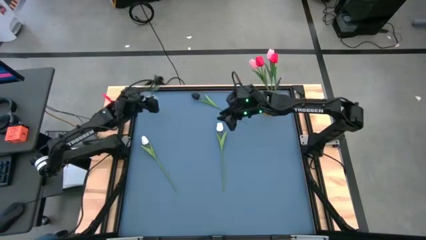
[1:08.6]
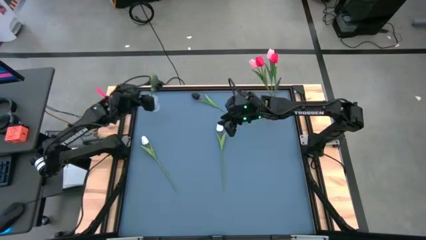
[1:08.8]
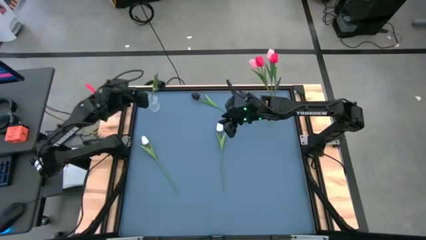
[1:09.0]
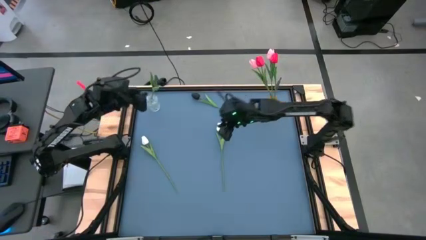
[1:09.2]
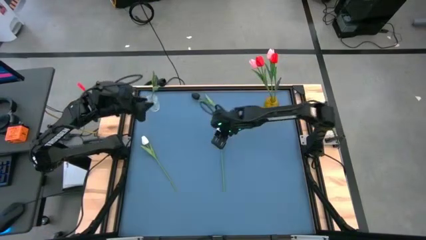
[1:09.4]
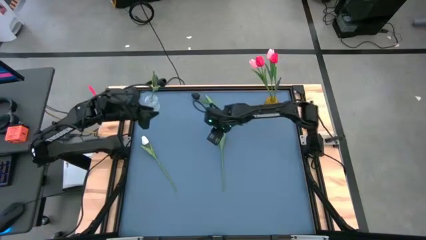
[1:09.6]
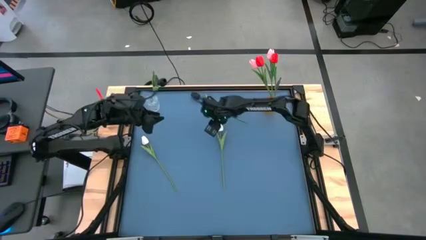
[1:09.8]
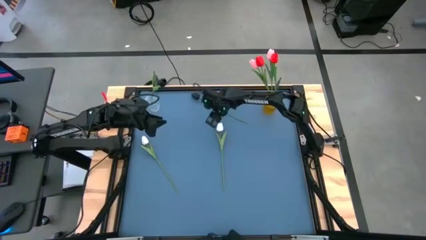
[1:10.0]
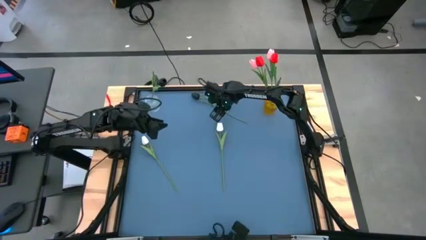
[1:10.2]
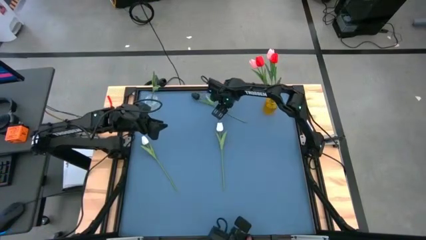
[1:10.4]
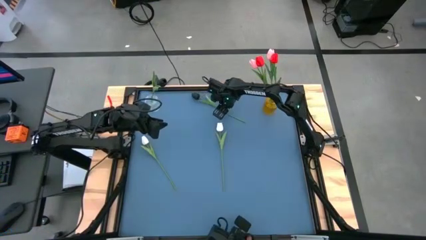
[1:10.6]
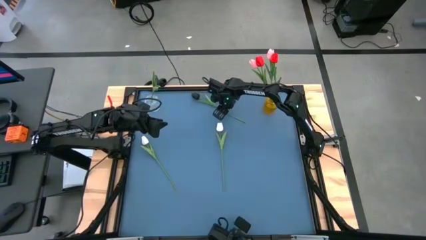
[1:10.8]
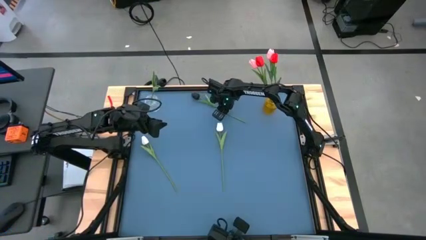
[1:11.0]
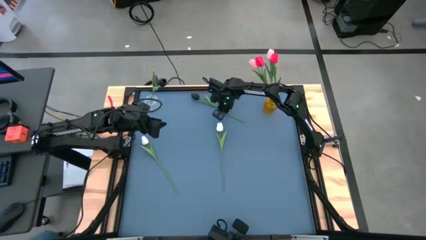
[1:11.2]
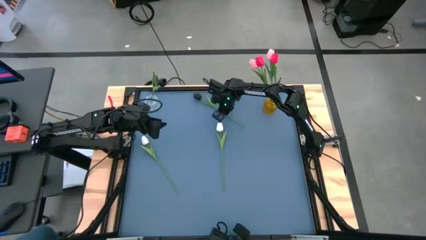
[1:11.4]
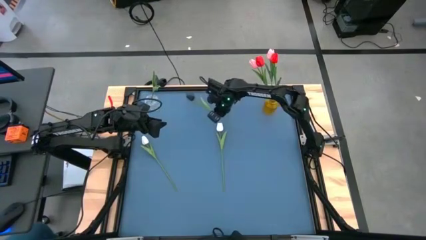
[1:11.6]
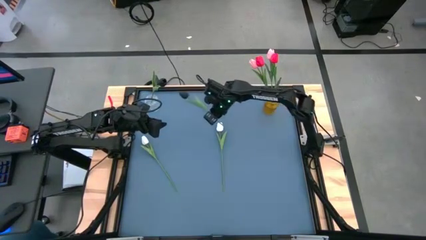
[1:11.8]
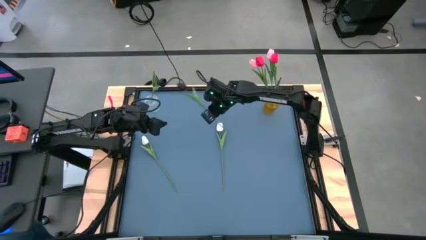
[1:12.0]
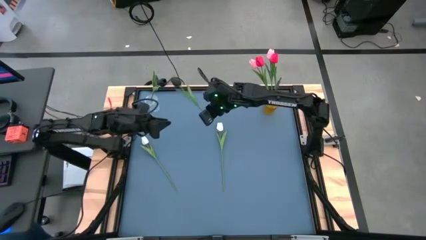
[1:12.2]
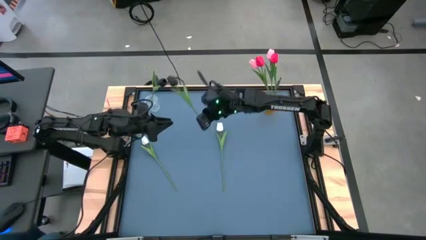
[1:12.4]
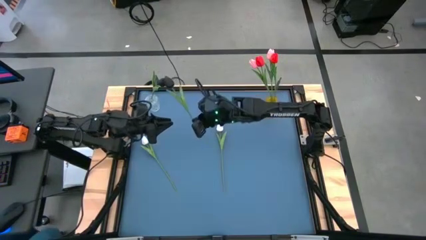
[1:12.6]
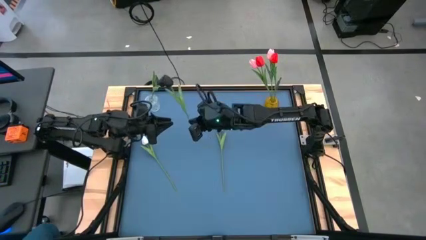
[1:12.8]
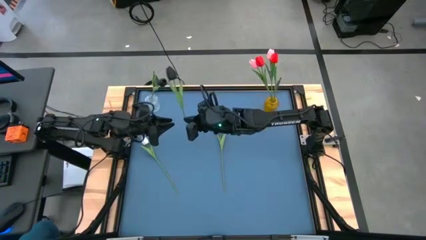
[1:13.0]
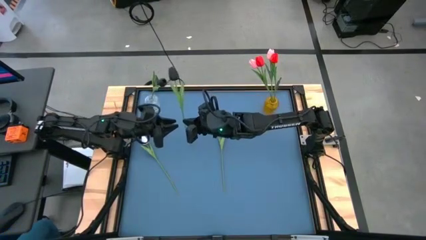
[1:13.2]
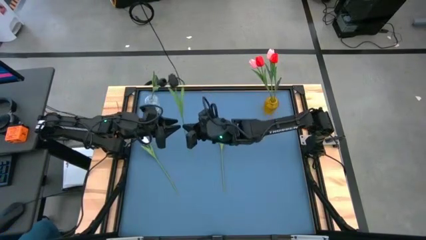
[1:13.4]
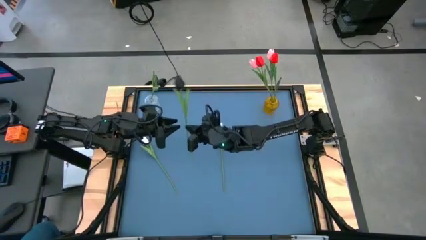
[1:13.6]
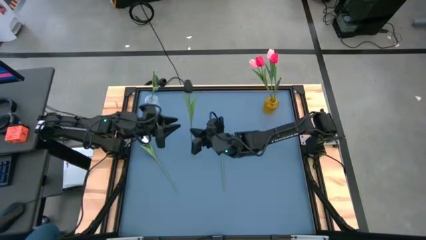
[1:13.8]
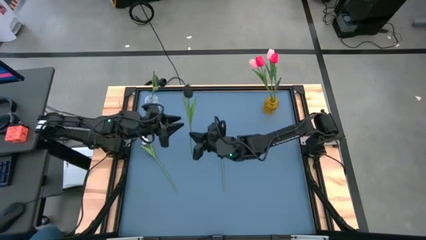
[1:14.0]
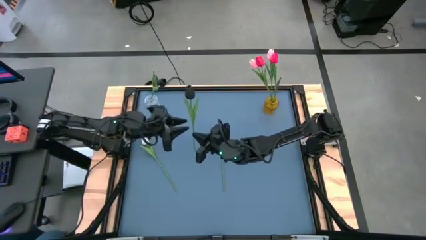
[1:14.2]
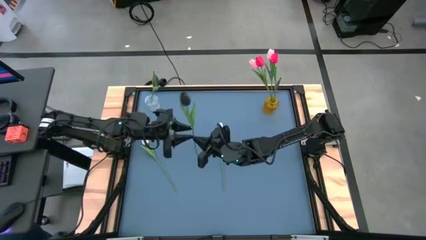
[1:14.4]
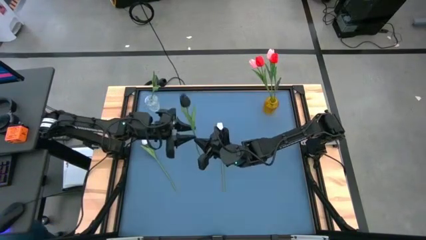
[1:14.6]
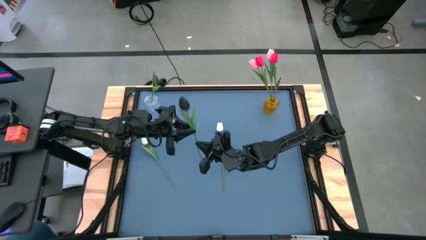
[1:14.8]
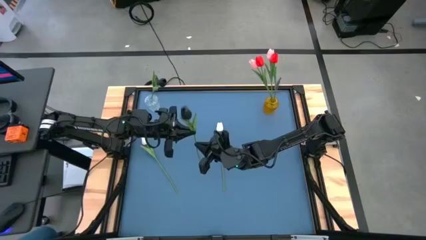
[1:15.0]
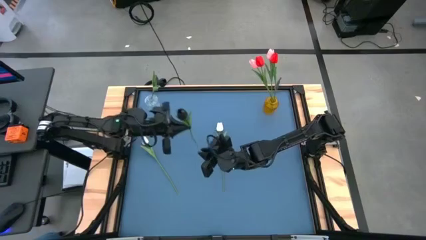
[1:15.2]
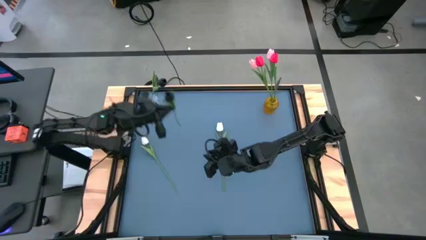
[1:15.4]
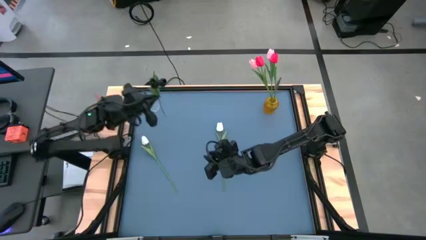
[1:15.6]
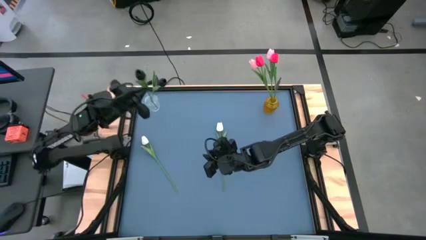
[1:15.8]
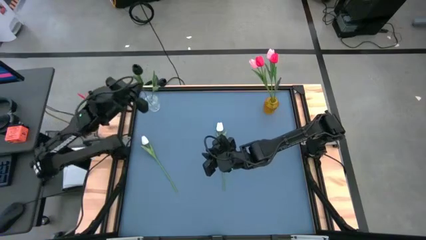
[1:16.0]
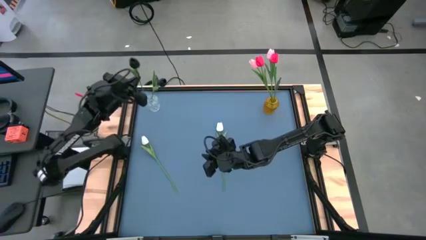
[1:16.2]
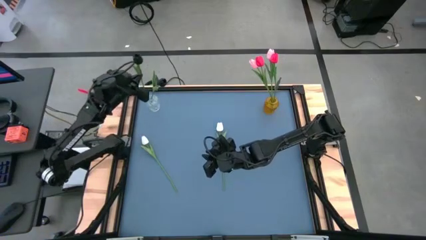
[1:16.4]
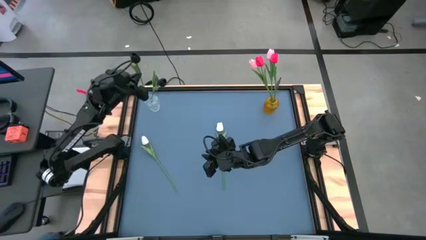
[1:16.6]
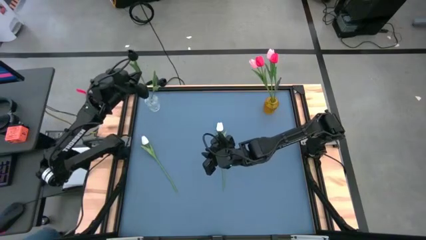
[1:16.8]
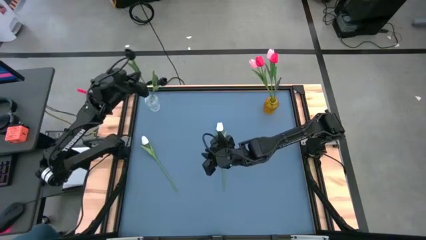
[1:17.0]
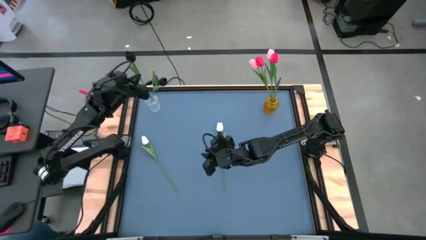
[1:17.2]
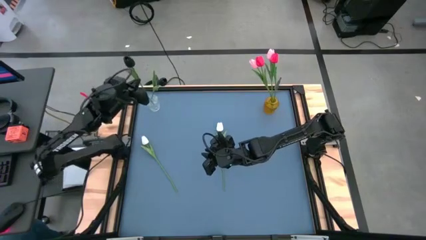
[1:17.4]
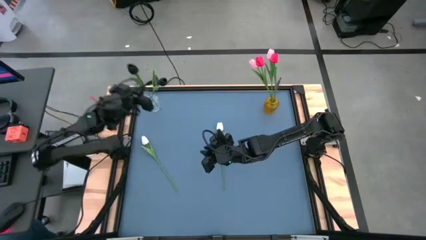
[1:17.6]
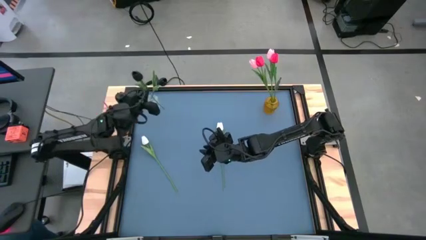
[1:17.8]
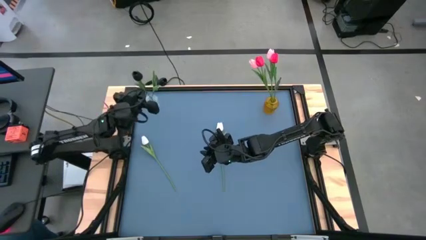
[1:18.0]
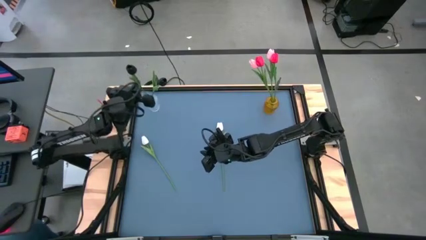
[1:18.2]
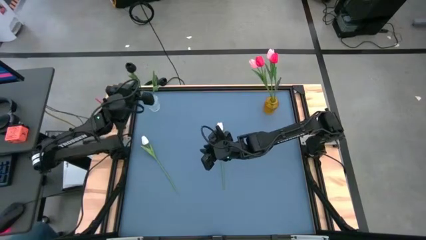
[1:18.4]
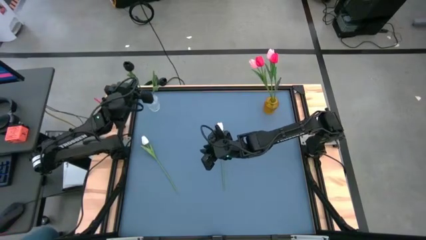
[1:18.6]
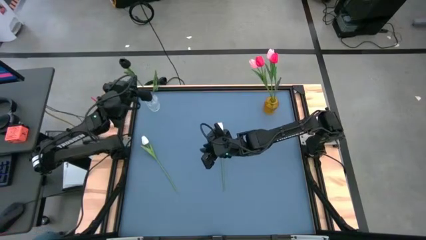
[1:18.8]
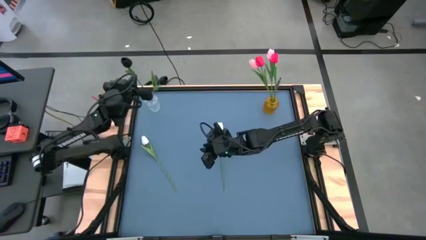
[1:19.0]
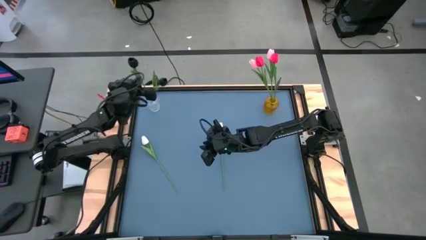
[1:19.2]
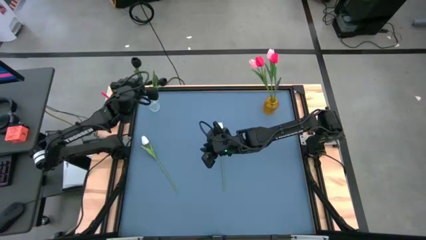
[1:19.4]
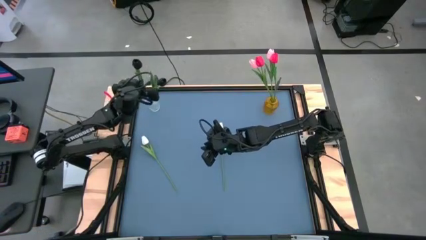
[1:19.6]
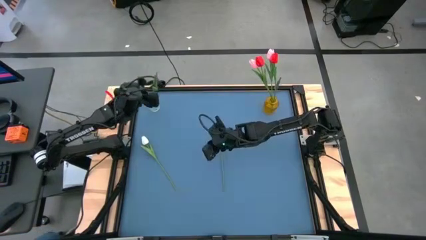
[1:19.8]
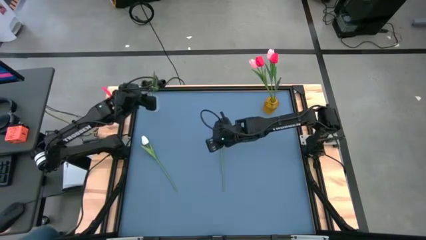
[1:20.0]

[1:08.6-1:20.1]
Task: Sort flowers into vase by color
Put the black flower into the transparent vase

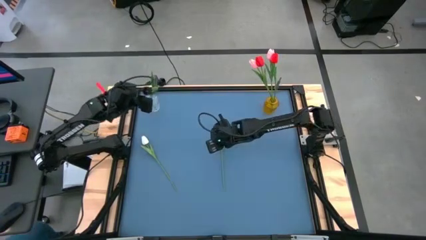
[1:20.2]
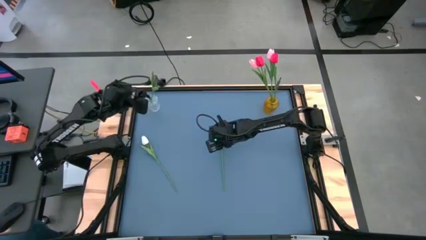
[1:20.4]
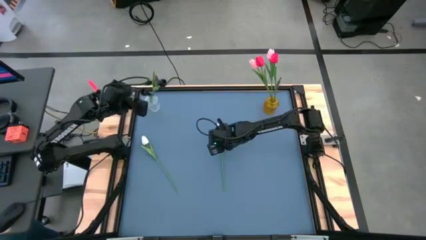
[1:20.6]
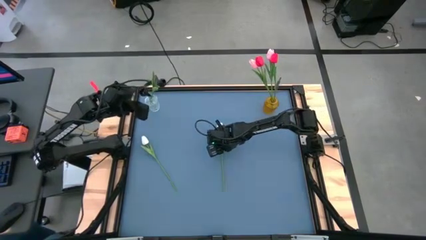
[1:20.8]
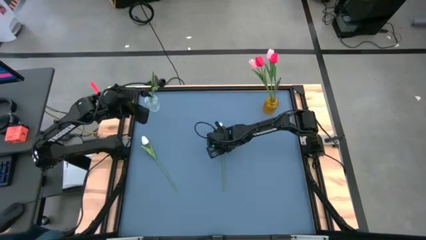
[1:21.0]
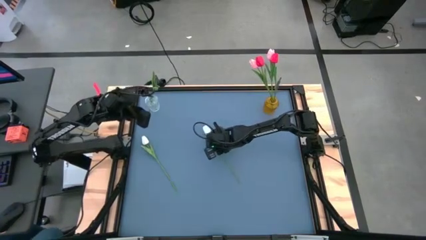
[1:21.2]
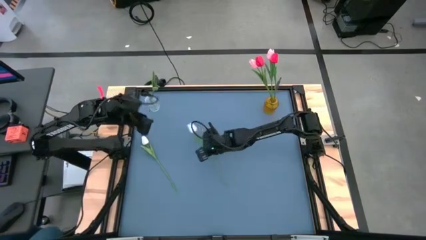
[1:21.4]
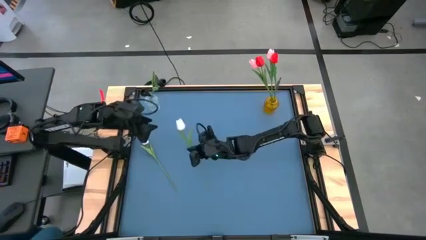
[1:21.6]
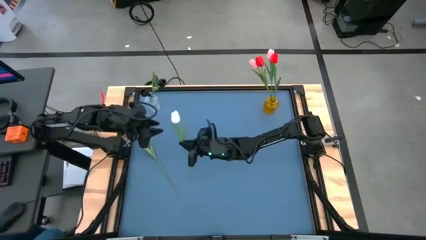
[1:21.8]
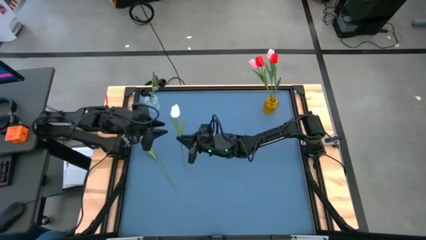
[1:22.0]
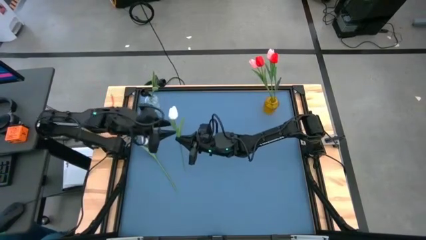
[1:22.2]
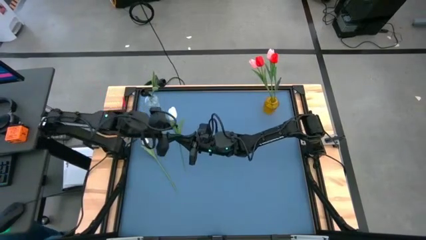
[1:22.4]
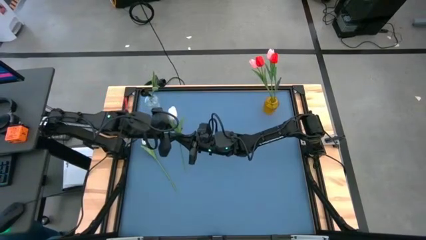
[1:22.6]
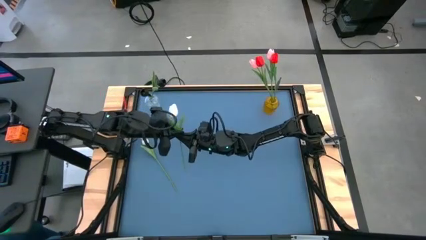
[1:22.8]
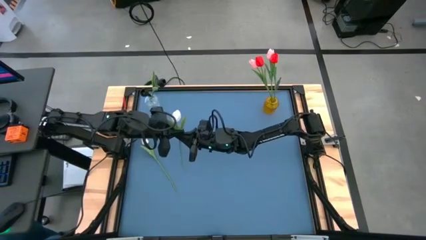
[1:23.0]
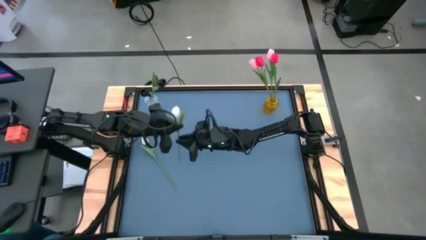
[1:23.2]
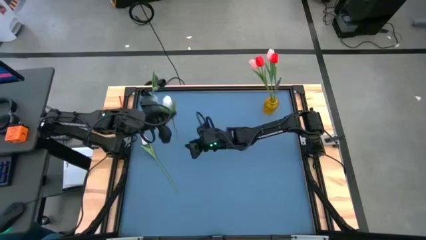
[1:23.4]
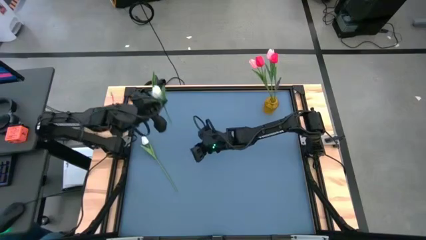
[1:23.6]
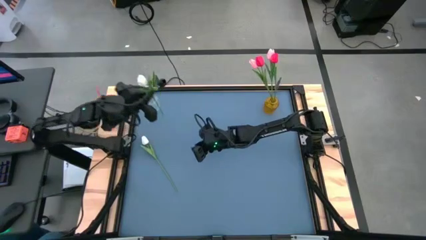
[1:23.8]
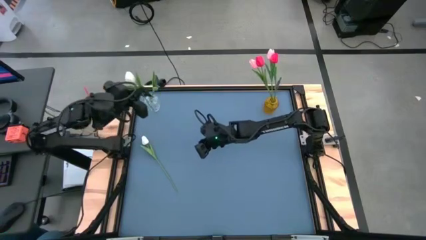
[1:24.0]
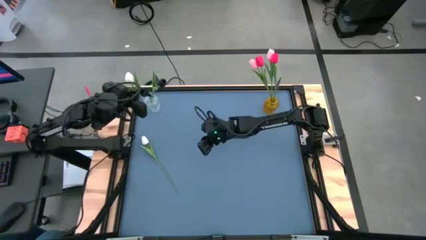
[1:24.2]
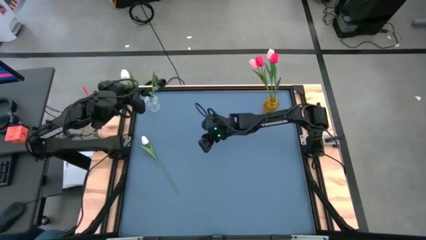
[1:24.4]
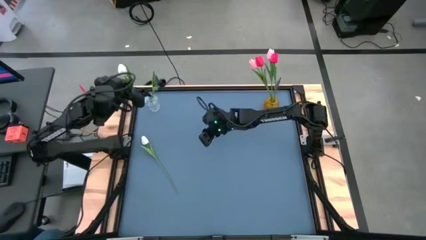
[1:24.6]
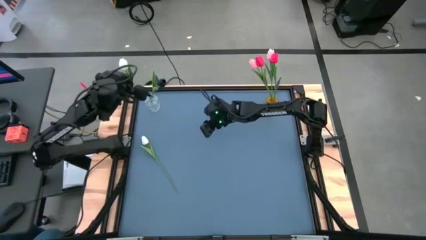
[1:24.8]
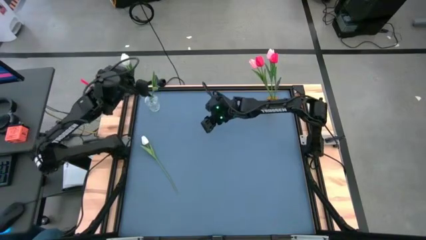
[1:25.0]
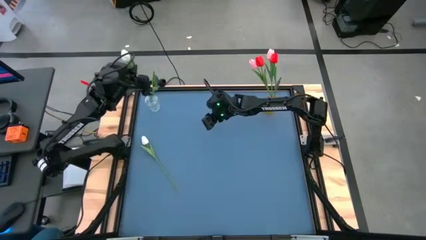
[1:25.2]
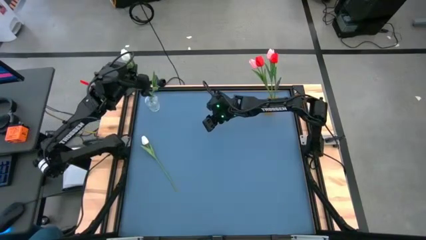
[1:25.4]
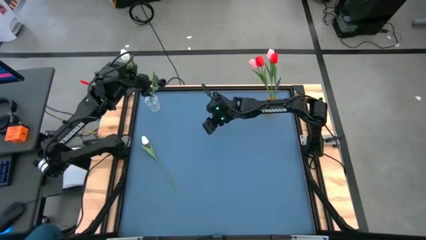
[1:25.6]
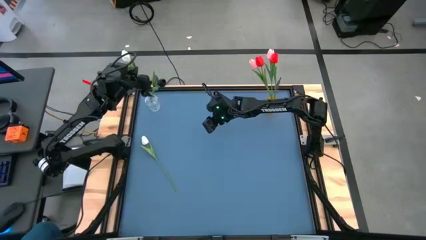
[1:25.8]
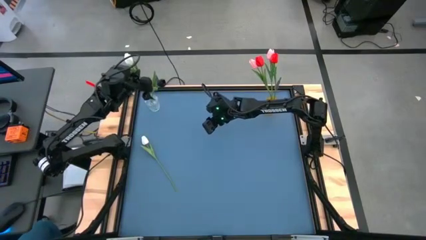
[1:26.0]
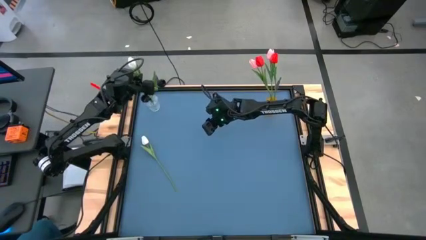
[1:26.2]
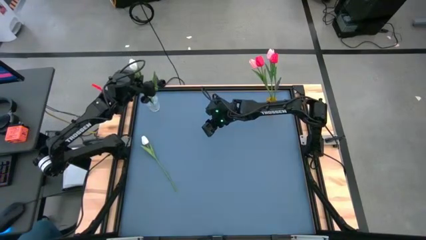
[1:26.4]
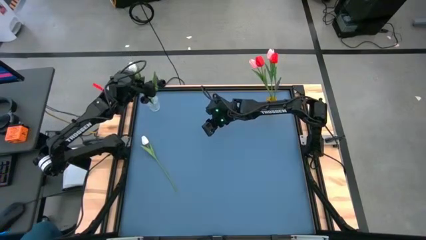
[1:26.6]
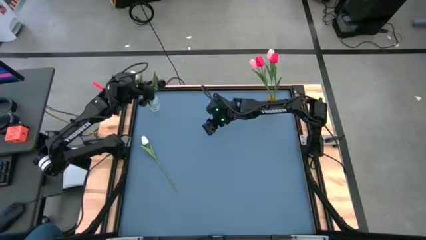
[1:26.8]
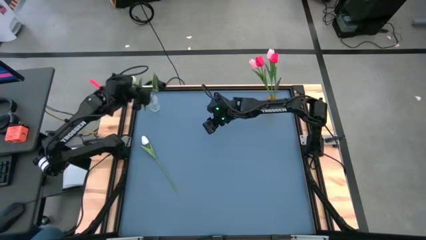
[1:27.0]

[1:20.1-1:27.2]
Put the right white flower into the transparent vase
